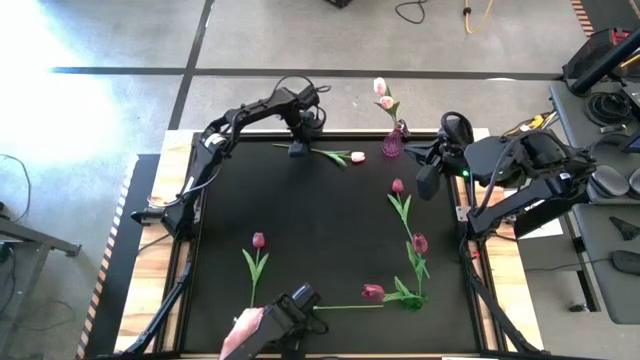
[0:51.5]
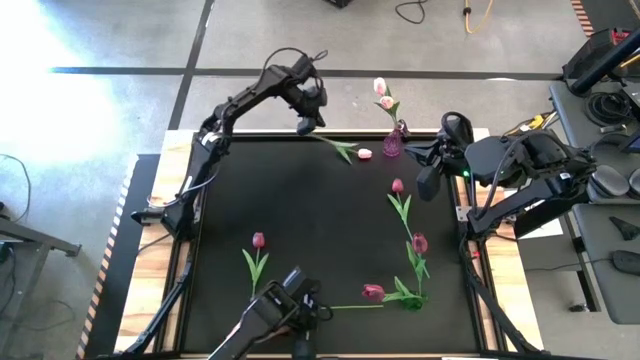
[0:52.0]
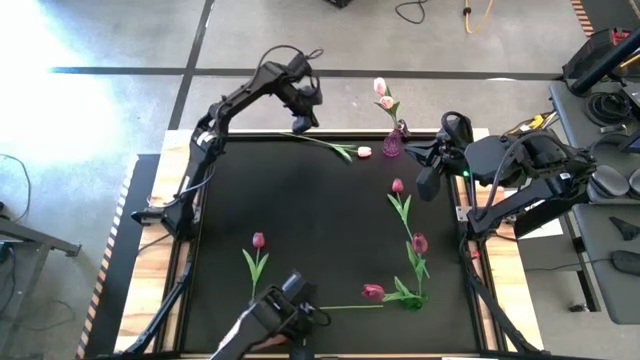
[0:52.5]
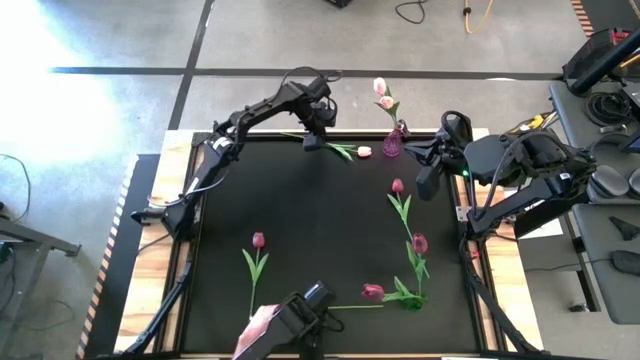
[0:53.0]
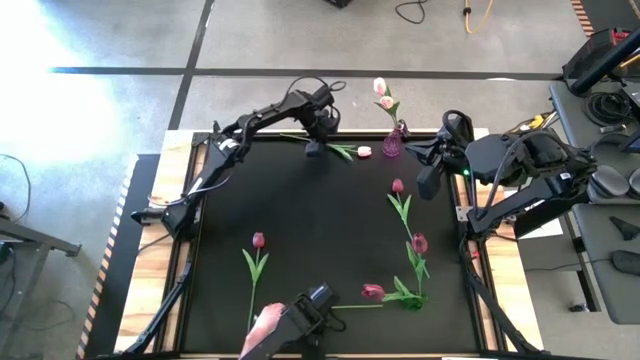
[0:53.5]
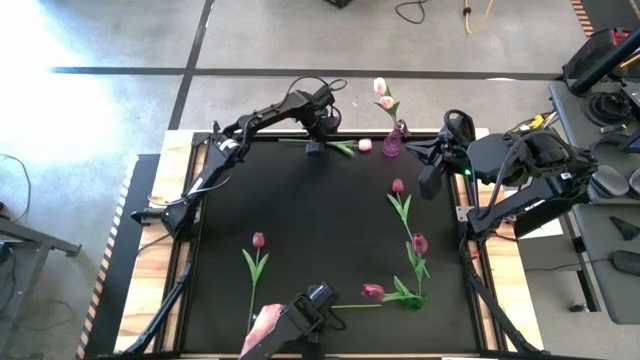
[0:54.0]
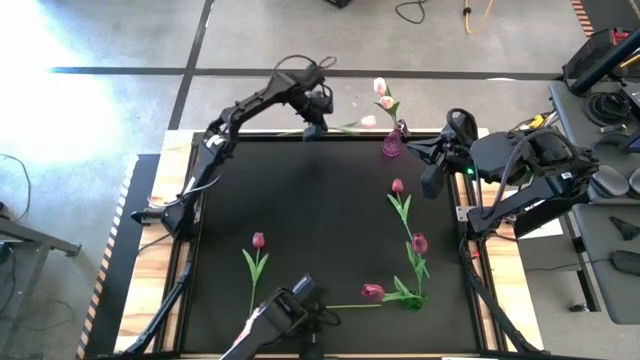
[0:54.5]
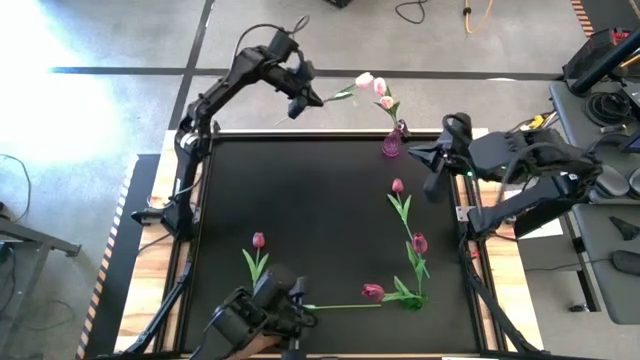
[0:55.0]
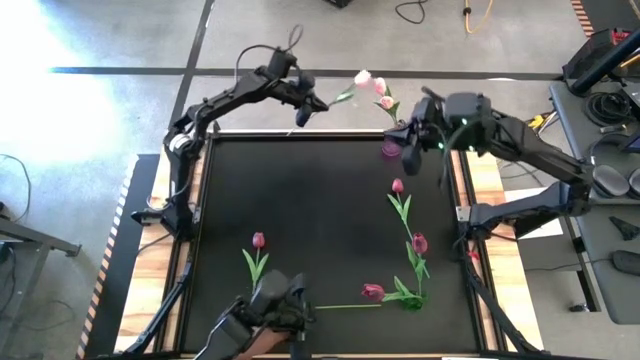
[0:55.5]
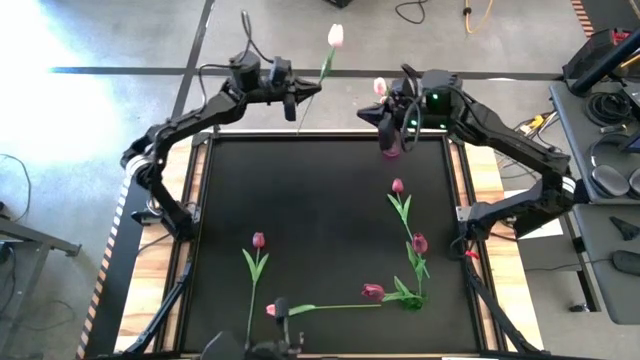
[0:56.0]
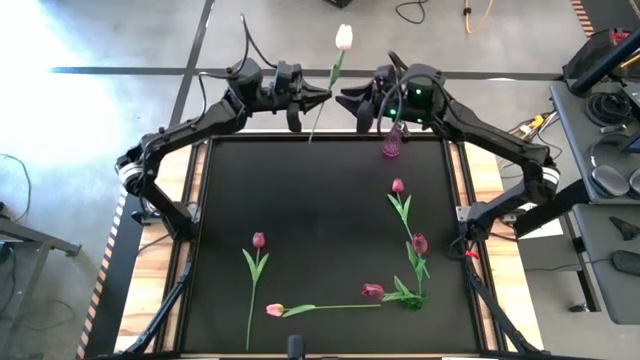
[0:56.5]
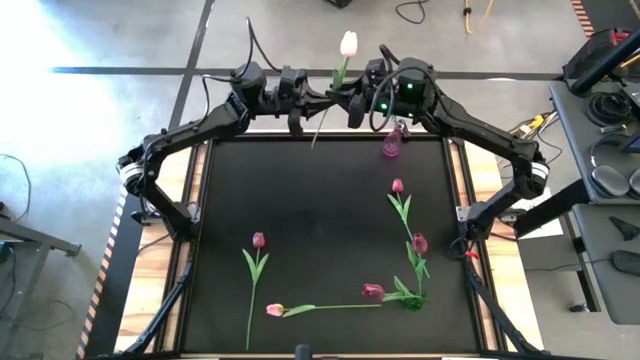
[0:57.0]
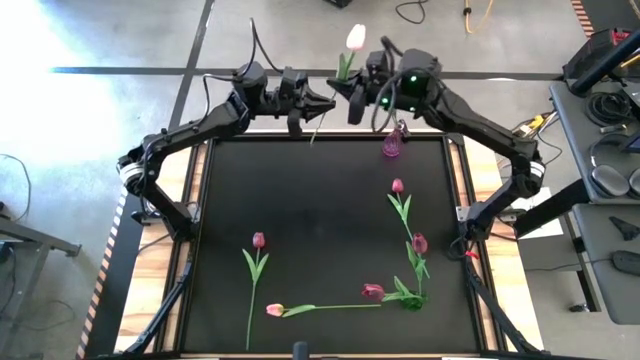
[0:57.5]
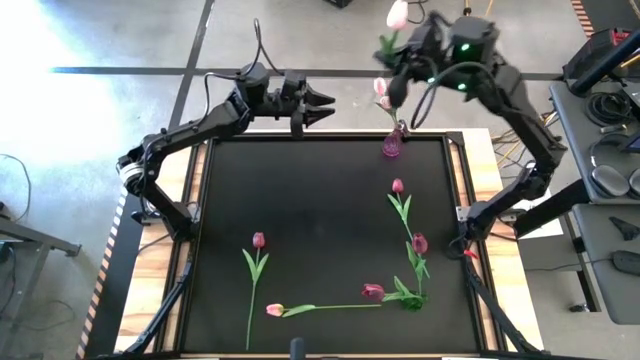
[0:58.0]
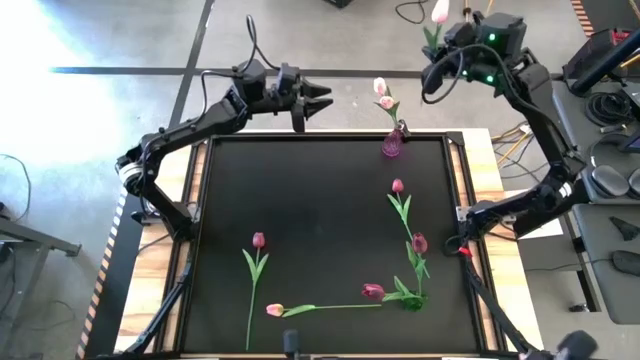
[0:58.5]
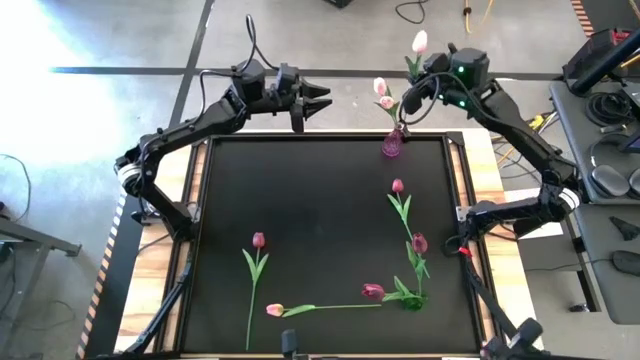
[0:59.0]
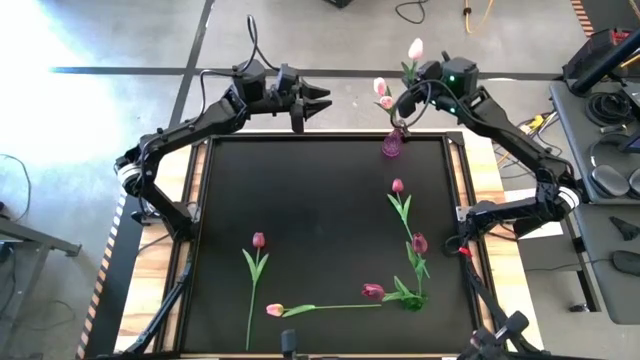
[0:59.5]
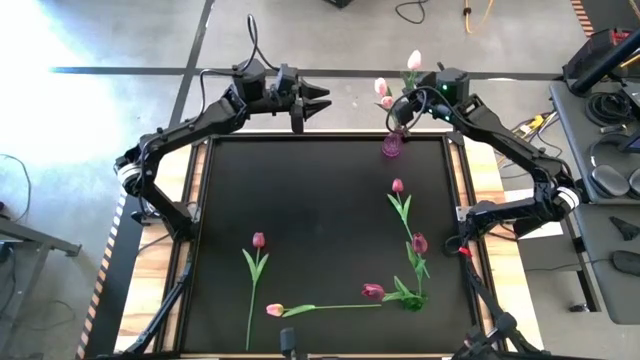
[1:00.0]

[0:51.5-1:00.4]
Task: Sort flowers into vase by color
Put the top pink tulip into the transparent pink vase

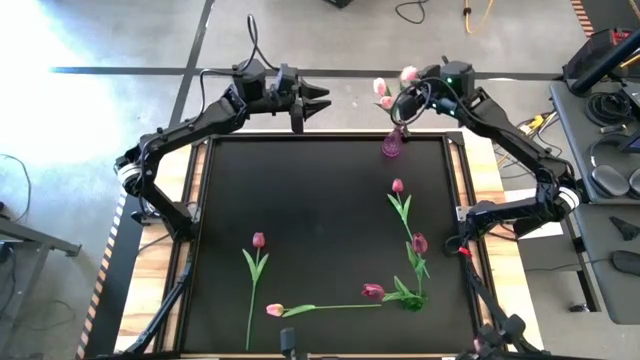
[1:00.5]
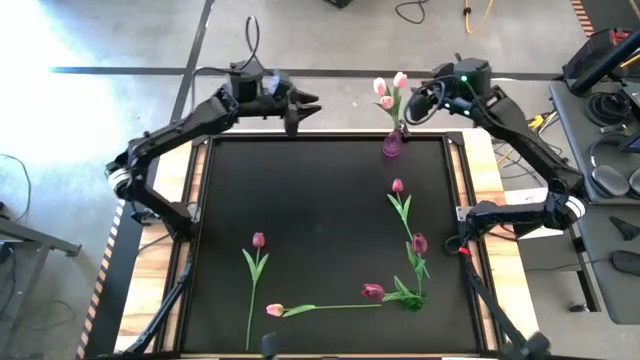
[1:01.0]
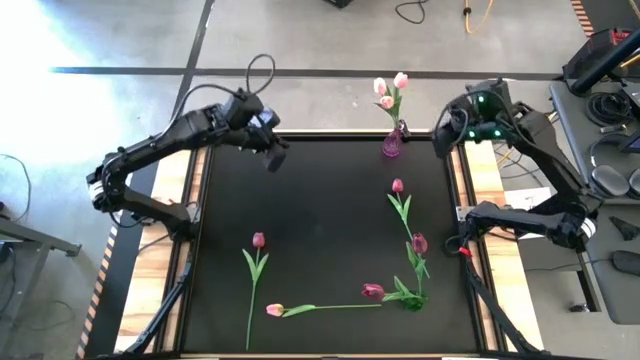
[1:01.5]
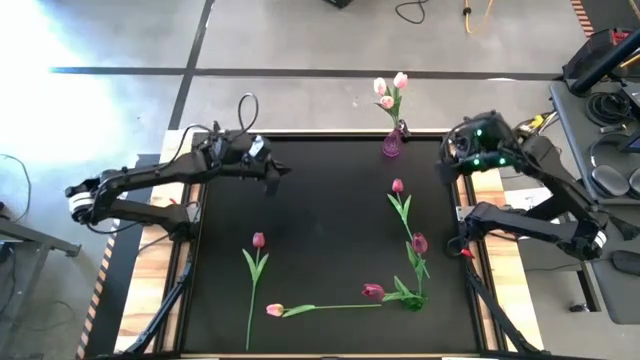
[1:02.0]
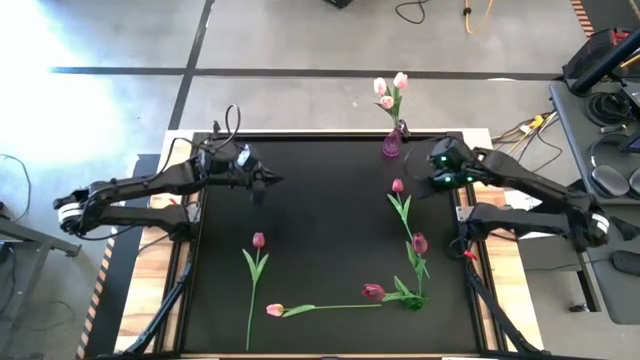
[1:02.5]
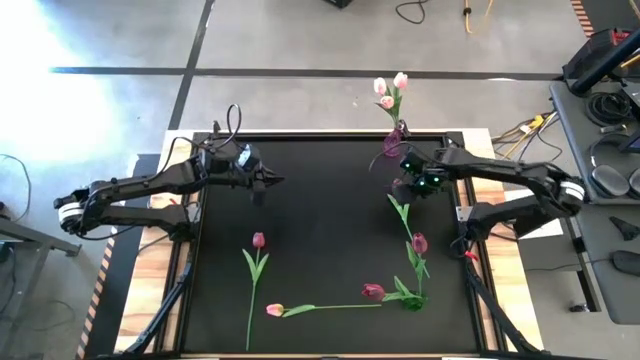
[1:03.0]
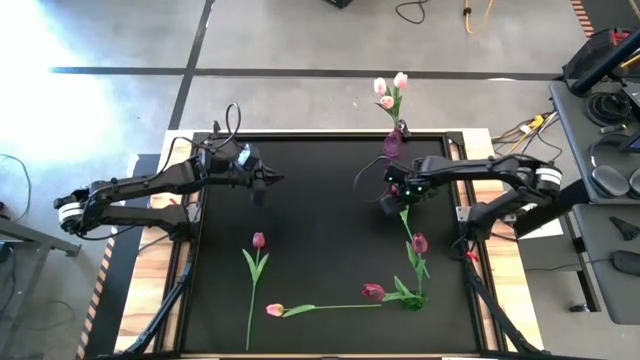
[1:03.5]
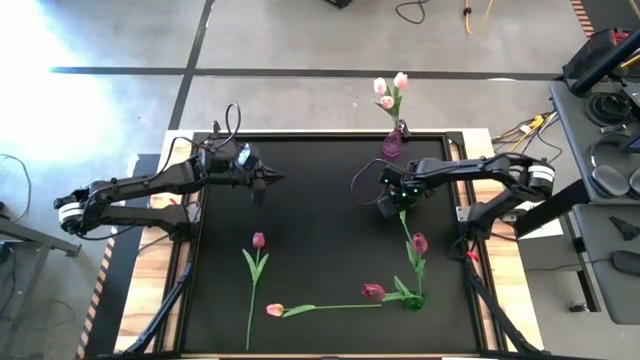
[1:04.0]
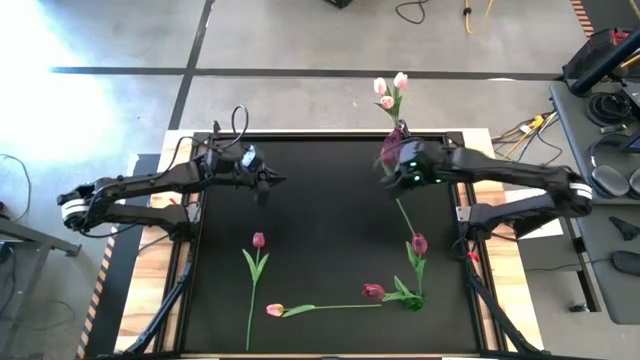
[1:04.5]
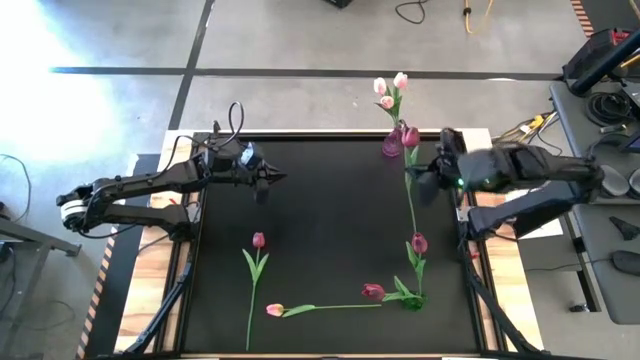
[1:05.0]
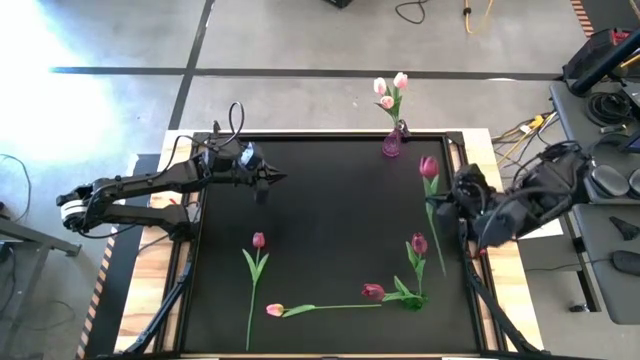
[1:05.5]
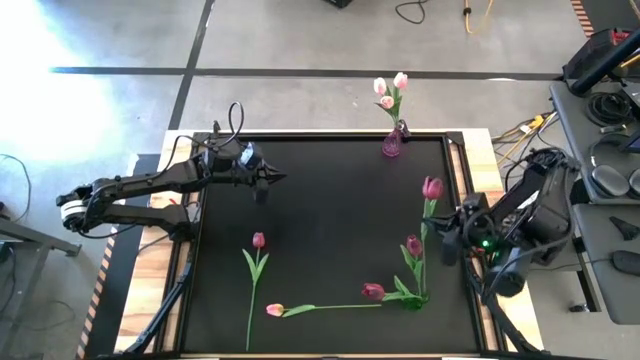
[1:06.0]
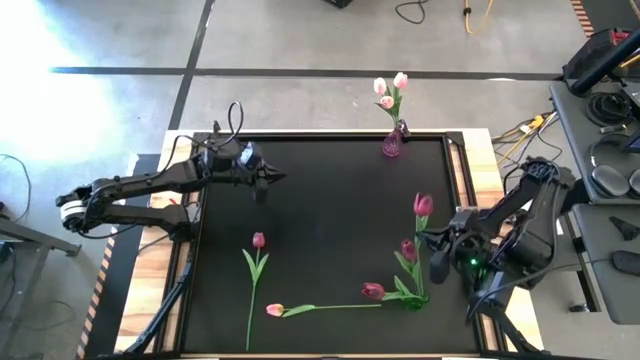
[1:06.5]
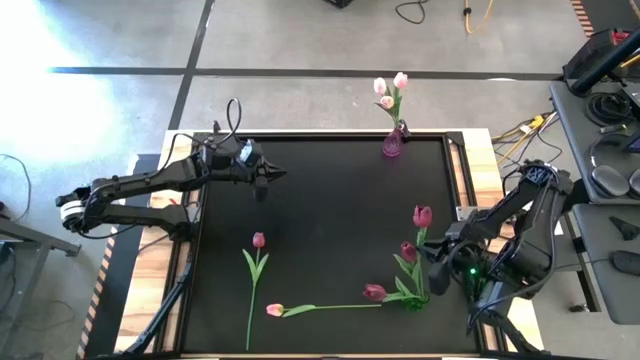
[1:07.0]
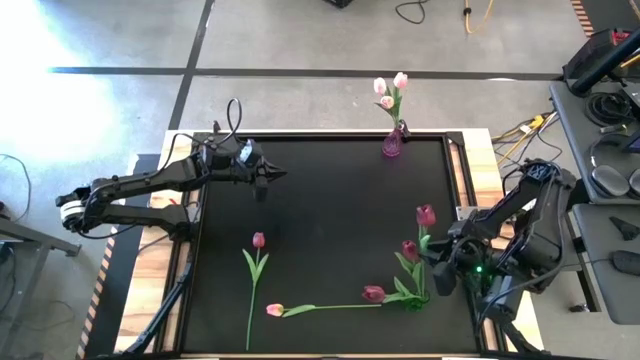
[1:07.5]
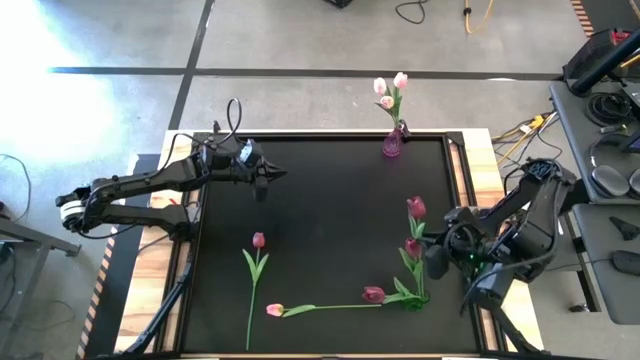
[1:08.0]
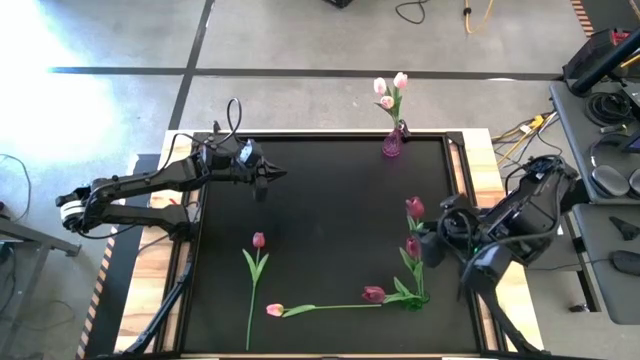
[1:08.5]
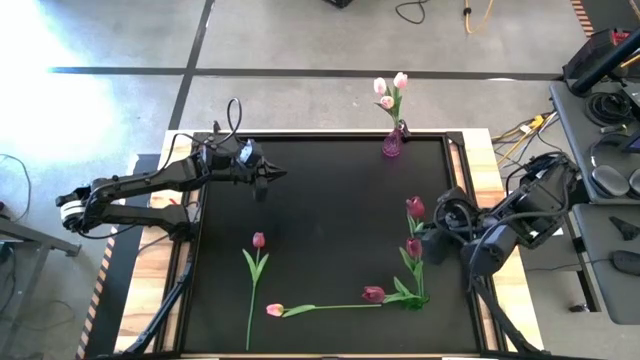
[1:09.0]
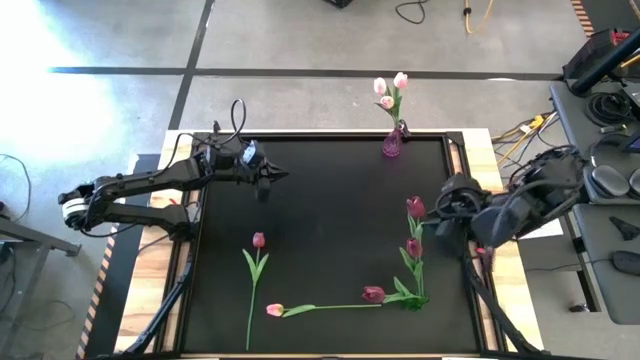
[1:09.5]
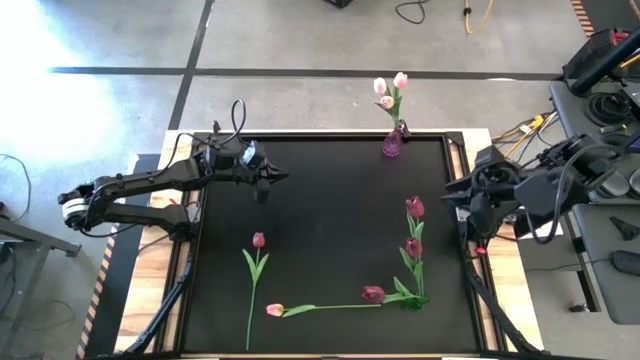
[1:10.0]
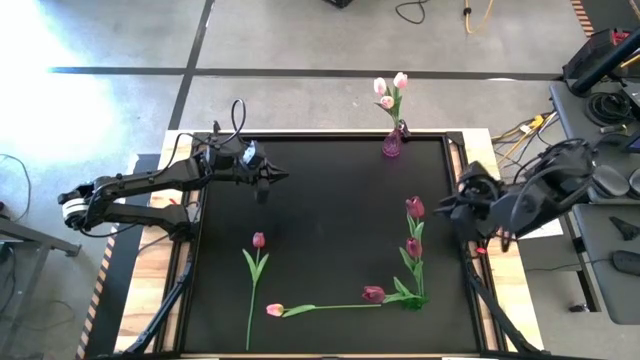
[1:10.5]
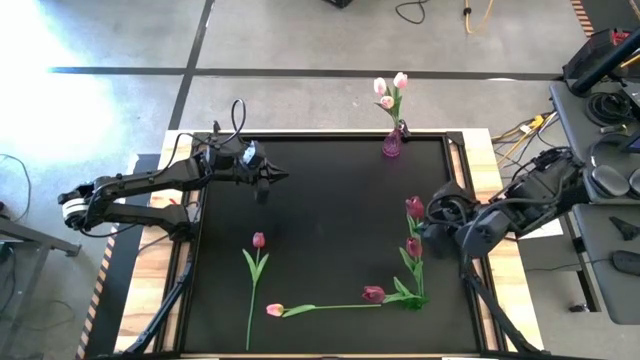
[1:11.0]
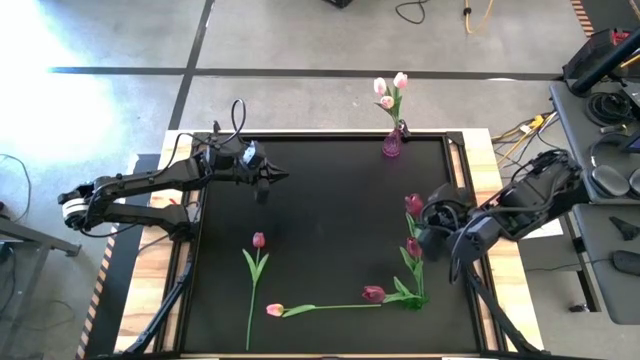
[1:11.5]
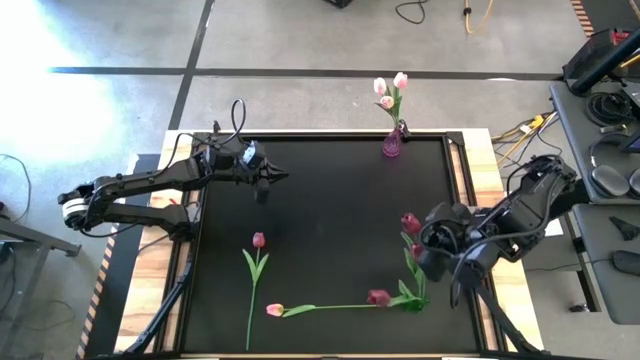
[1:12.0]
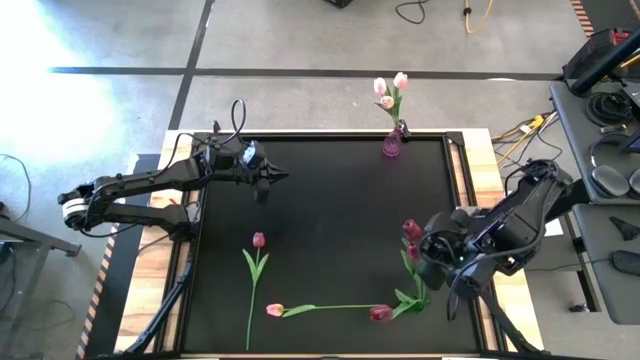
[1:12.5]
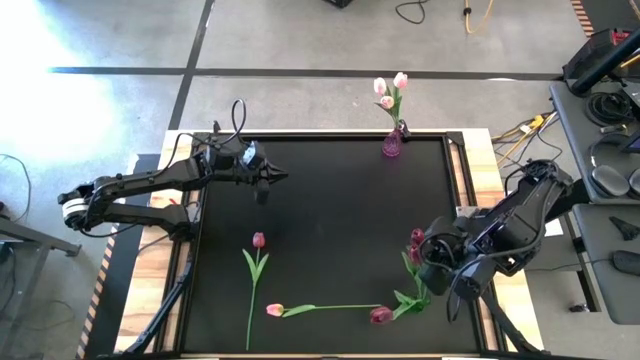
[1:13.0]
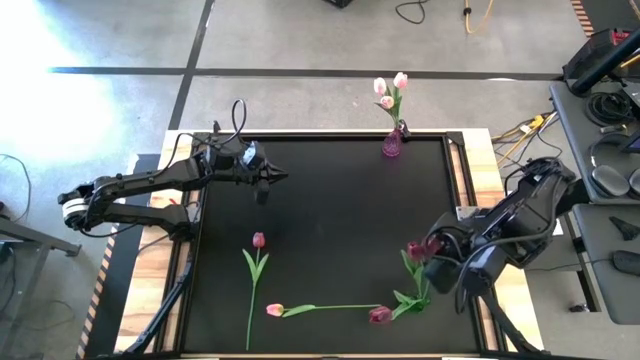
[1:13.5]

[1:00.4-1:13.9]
Put the right red tulip into the transparent green vase
